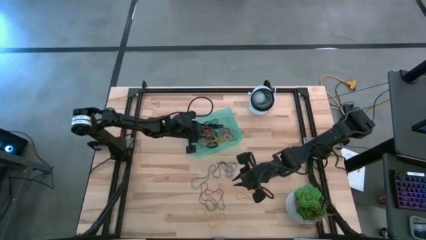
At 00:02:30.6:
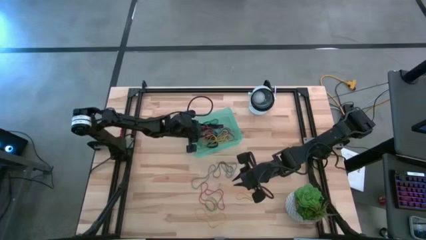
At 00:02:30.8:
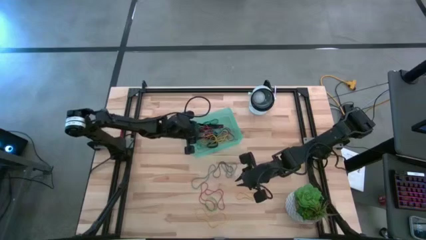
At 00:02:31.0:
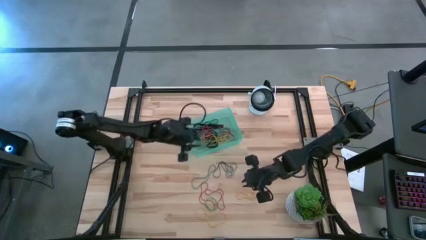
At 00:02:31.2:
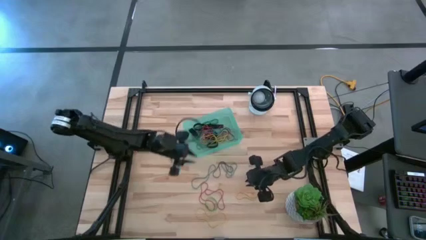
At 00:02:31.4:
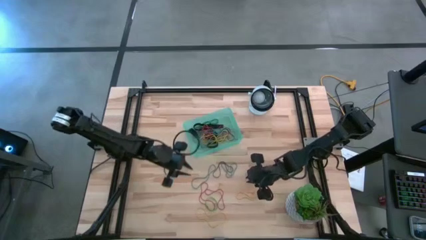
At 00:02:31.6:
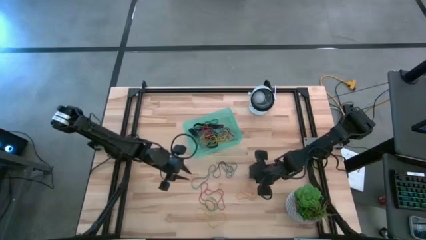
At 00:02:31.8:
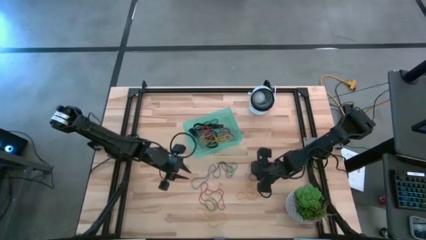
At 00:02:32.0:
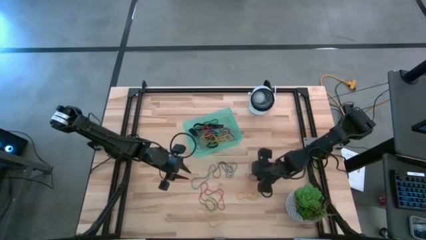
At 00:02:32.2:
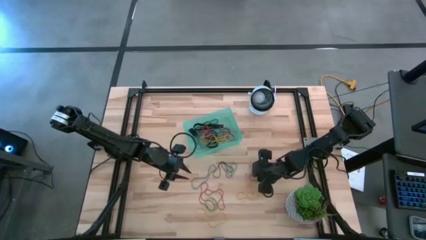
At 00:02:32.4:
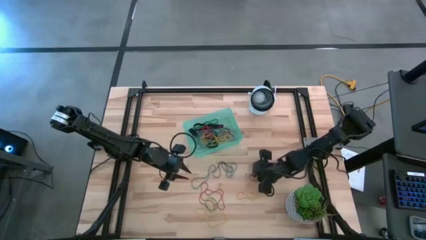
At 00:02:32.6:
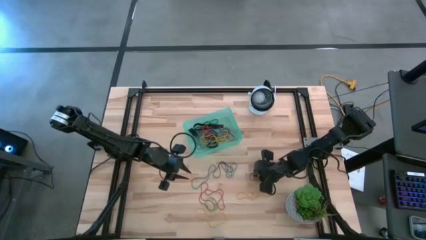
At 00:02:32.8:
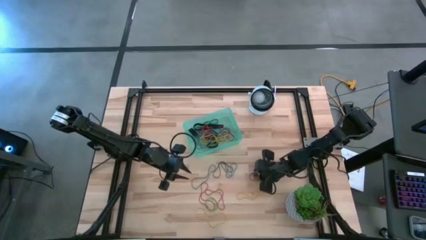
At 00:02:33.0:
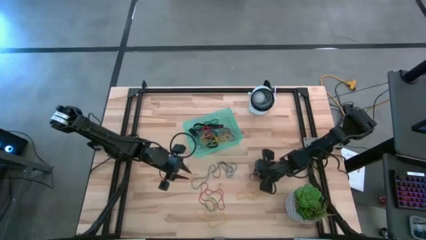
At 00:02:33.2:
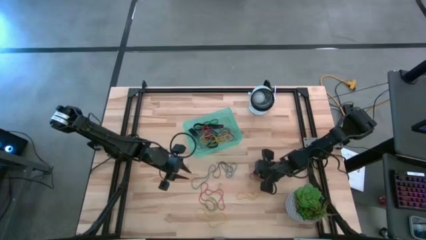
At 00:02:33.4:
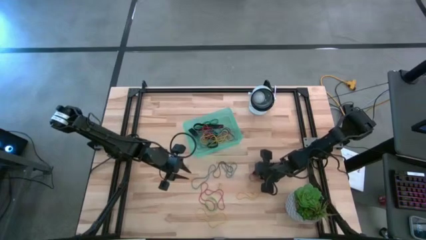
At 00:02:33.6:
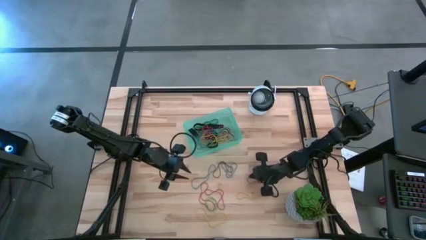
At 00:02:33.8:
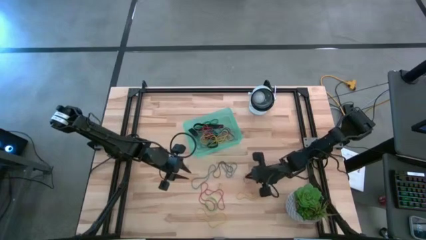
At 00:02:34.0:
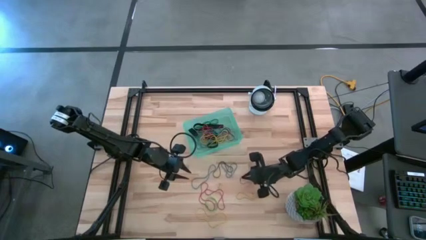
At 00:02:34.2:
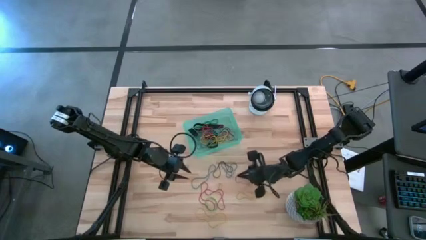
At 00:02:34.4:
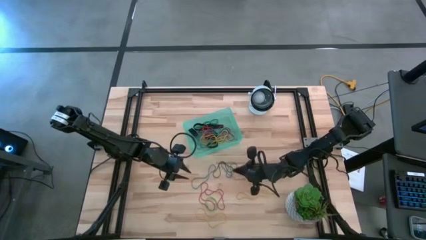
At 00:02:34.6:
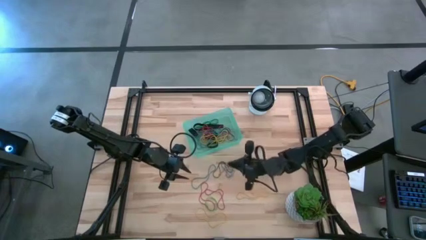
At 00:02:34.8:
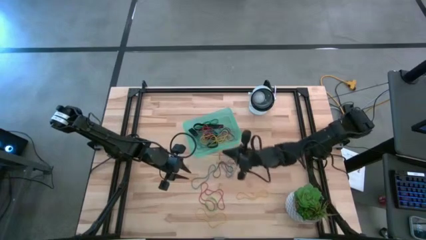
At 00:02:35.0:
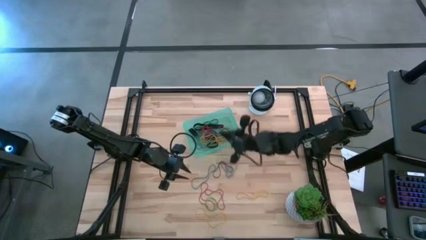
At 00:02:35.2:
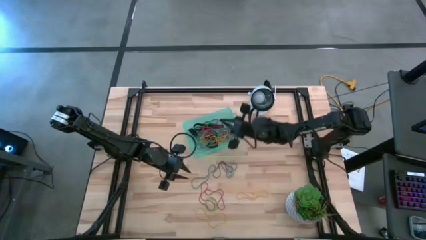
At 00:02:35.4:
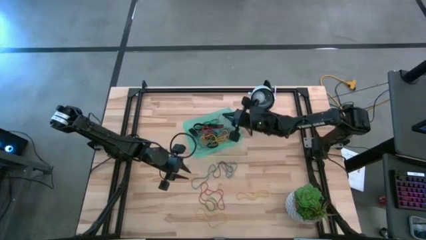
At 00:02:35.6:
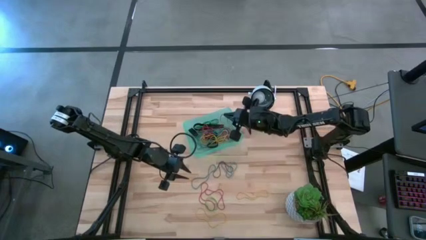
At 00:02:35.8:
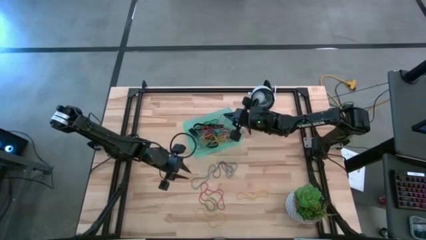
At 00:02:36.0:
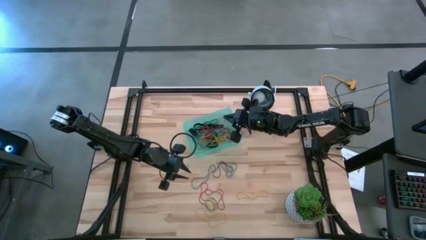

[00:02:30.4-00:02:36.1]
Task: Pick and place rubber bands into bin
Put the red rubber band into the green bin

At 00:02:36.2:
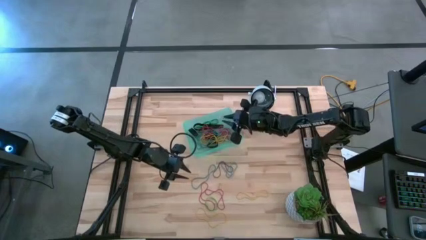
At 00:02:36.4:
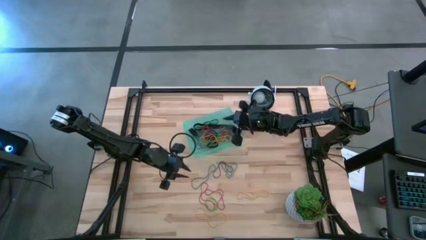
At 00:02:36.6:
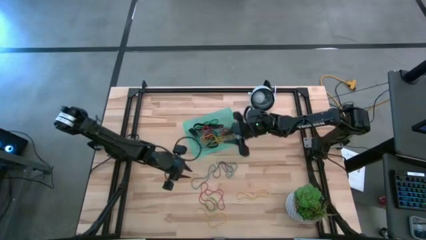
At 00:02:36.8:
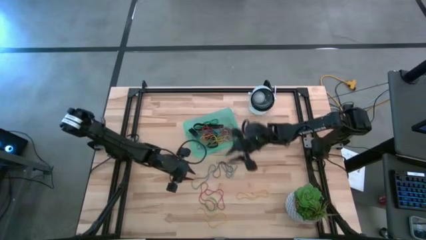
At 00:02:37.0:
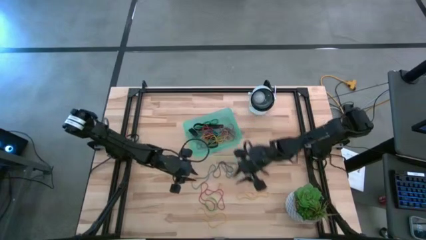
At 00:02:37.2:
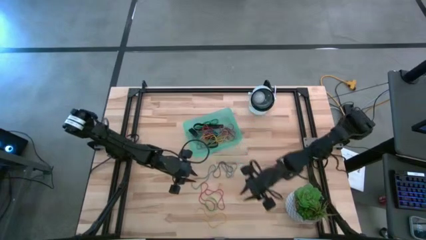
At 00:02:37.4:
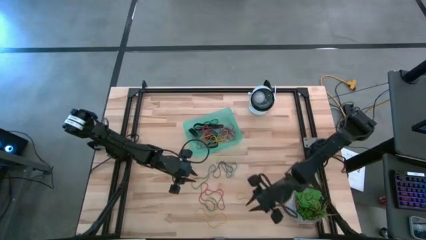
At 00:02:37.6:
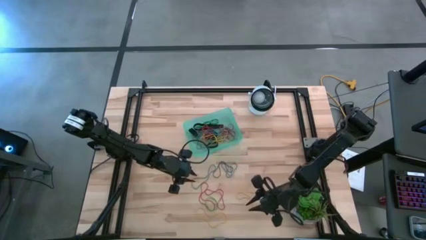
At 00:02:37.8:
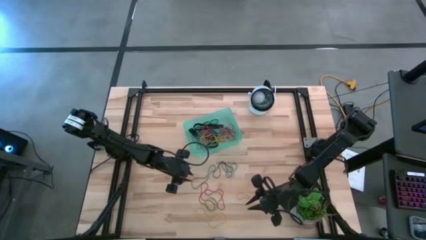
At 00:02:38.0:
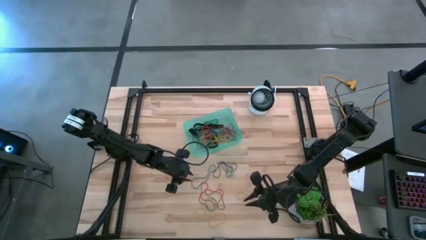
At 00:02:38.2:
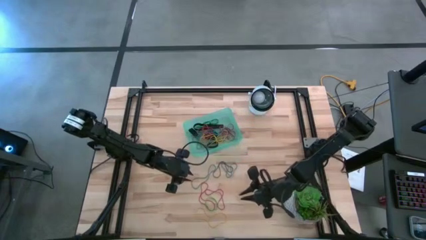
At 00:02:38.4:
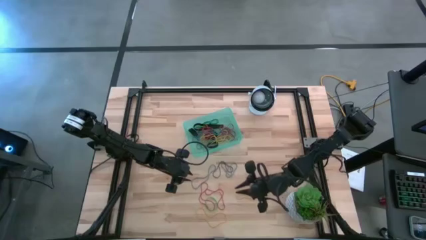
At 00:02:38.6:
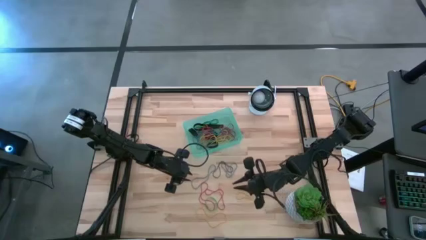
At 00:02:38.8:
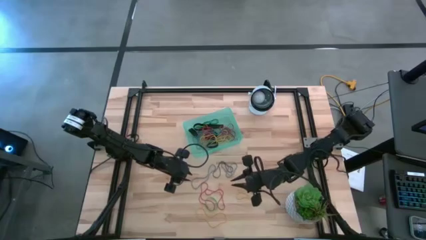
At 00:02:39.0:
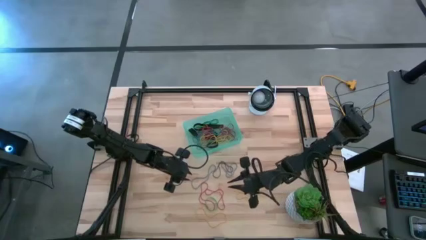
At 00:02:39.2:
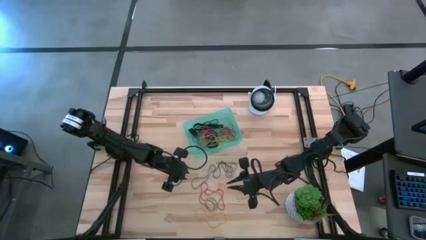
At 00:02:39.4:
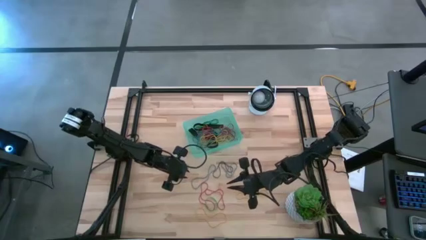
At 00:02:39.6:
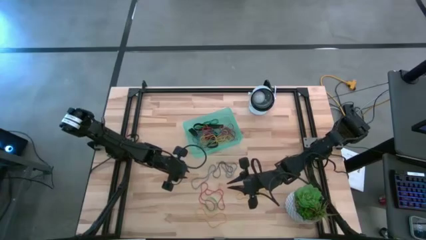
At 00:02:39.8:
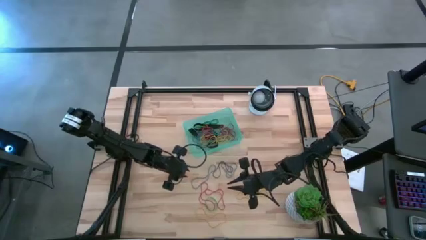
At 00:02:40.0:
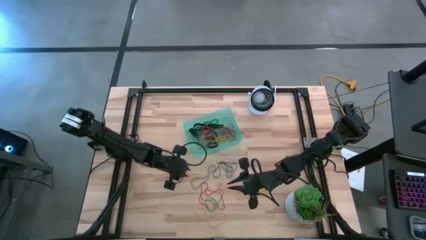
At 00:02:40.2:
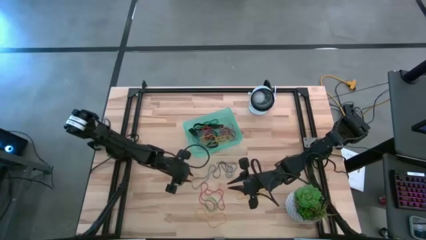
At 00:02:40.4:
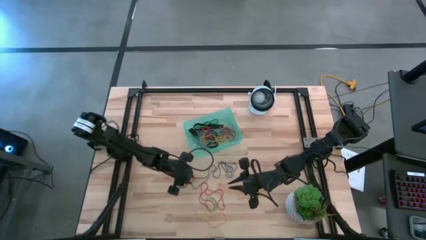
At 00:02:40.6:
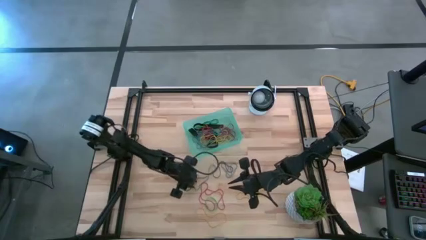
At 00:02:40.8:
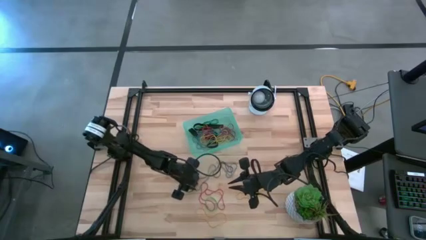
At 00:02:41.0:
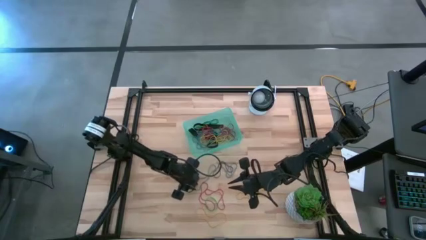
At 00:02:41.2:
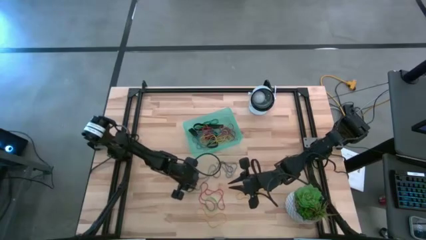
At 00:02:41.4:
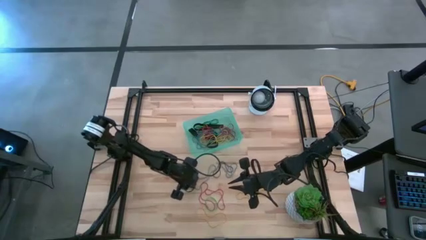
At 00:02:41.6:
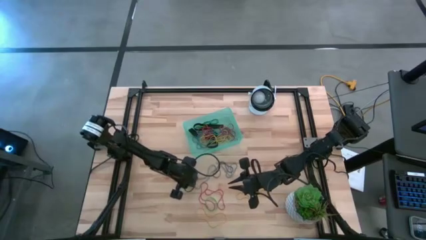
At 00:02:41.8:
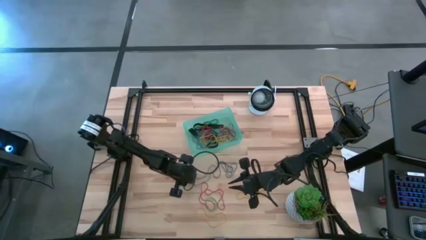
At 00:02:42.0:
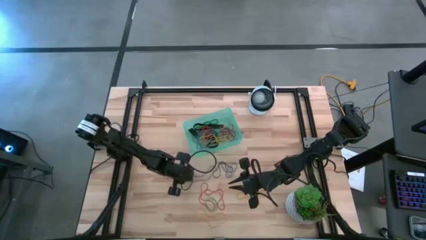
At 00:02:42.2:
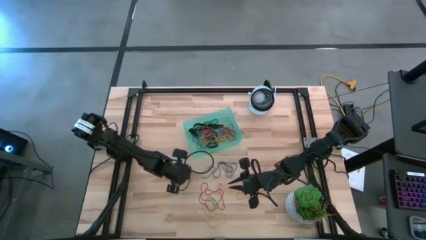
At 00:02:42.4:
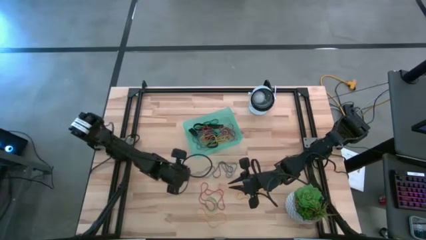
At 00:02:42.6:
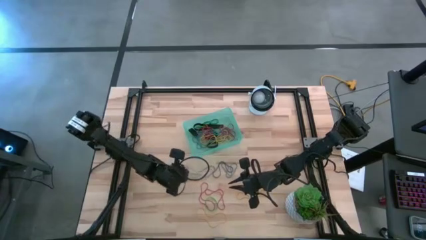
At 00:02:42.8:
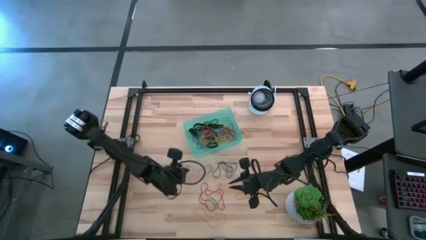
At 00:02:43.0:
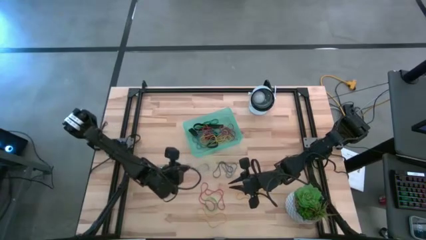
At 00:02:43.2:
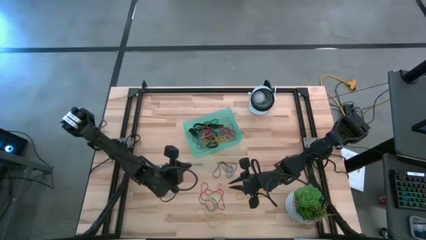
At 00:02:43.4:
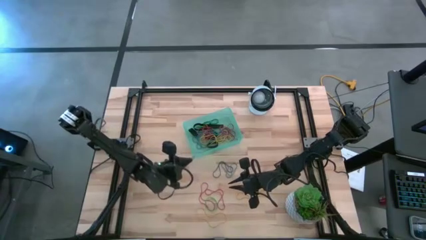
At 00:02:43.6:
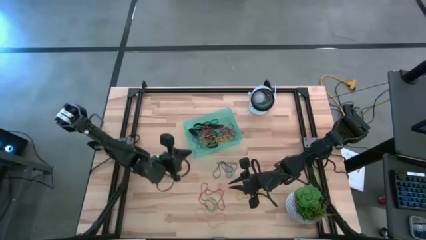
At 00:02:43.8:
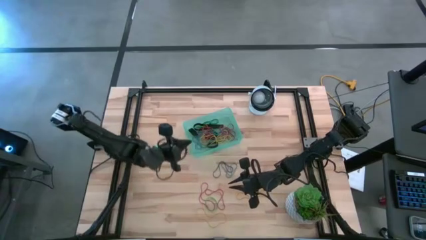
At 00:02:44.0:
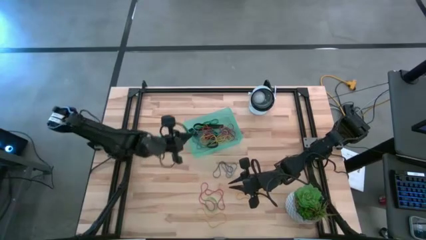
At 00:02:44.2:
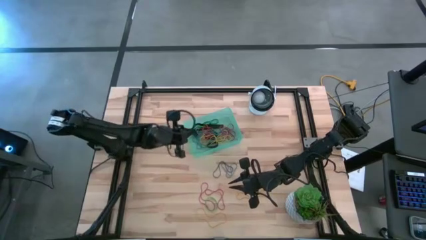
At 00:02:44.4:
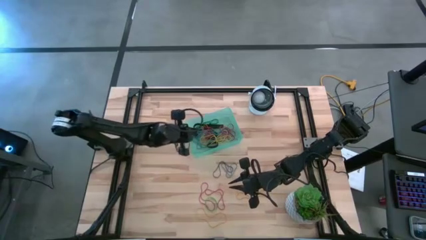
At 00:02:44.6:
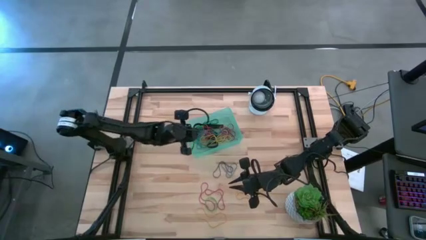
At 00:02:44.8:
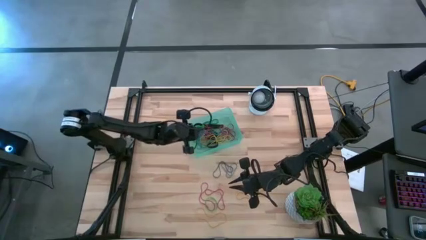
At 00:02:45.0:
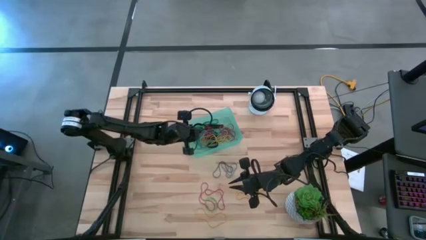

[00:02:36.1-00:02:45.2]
Put the blue rubber band into the green bin
